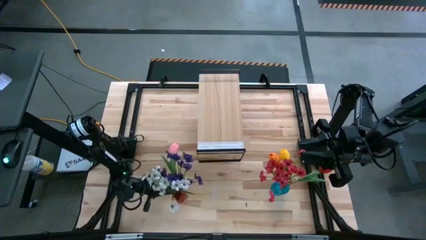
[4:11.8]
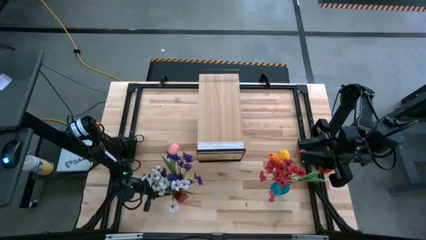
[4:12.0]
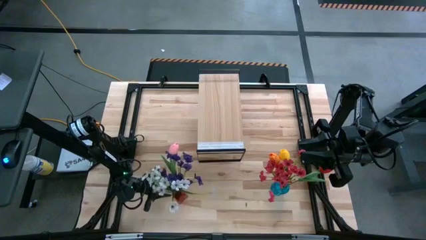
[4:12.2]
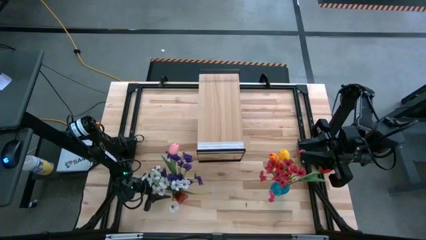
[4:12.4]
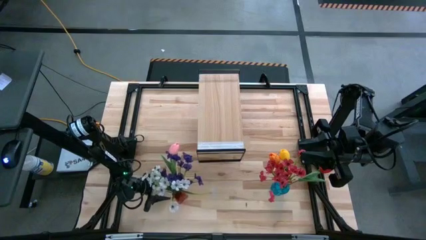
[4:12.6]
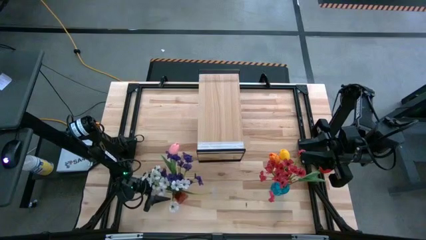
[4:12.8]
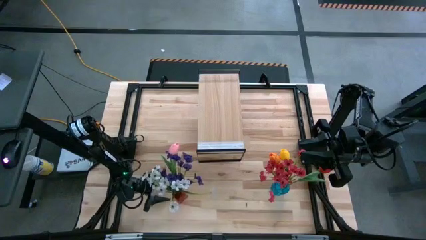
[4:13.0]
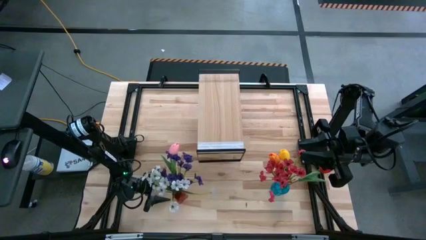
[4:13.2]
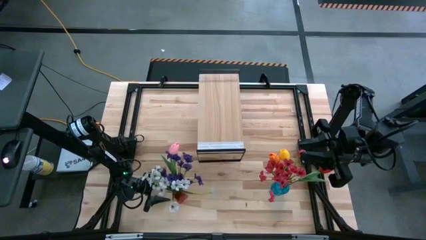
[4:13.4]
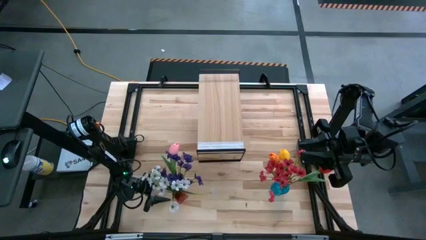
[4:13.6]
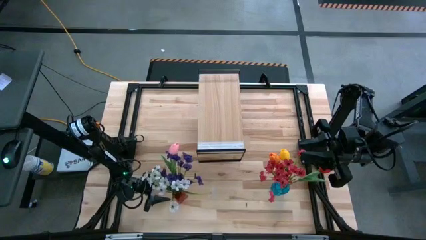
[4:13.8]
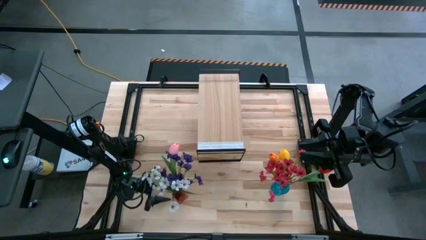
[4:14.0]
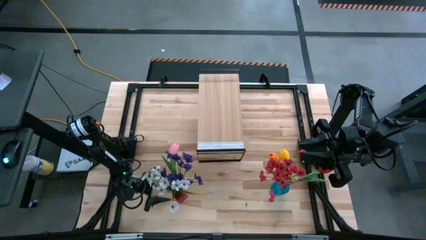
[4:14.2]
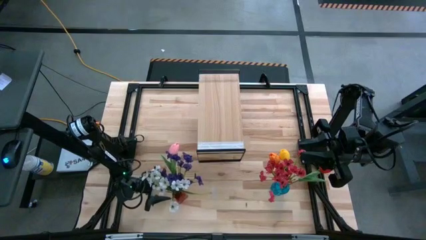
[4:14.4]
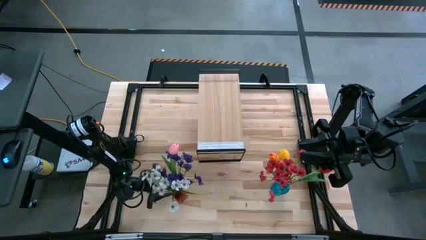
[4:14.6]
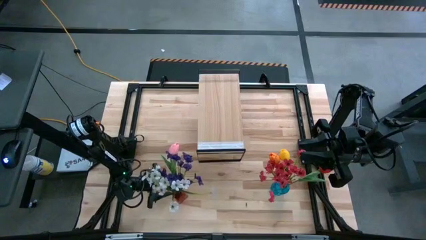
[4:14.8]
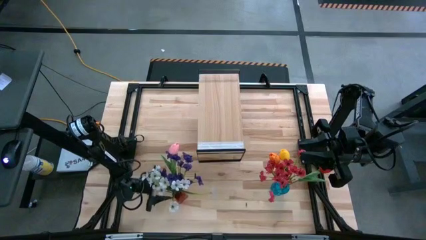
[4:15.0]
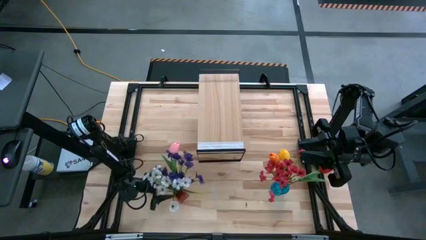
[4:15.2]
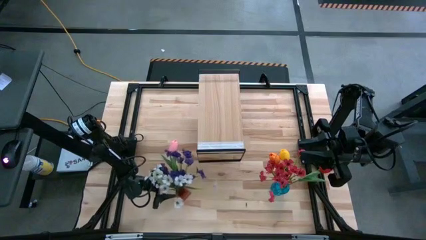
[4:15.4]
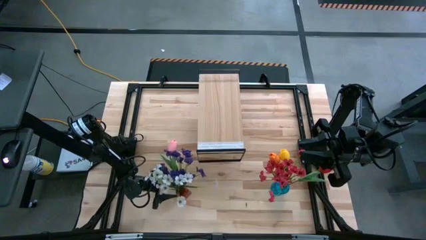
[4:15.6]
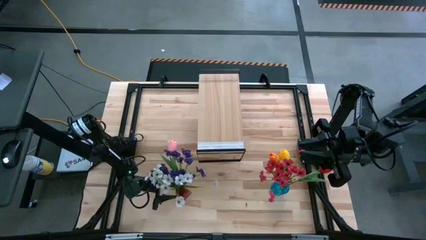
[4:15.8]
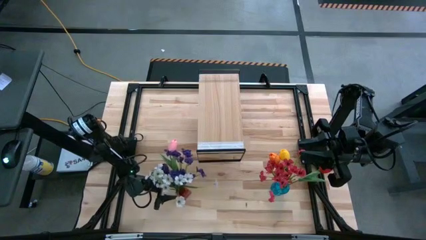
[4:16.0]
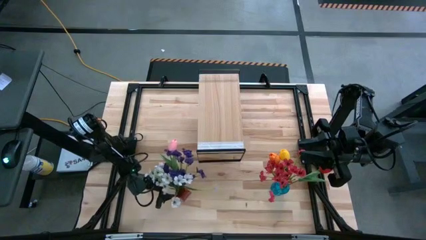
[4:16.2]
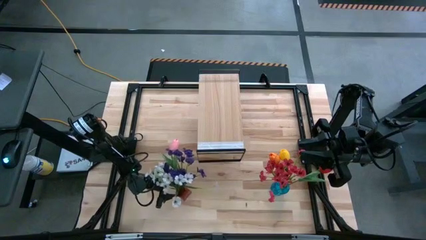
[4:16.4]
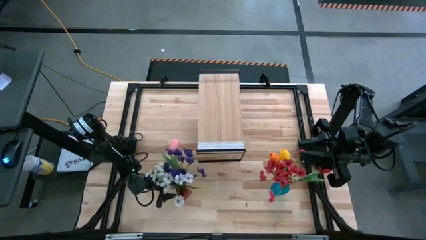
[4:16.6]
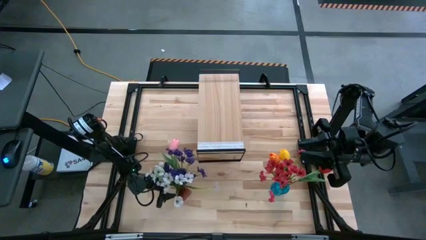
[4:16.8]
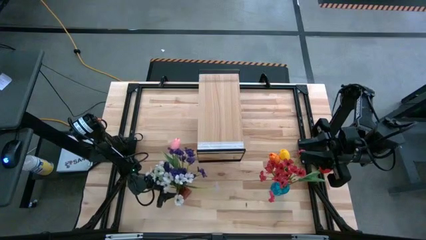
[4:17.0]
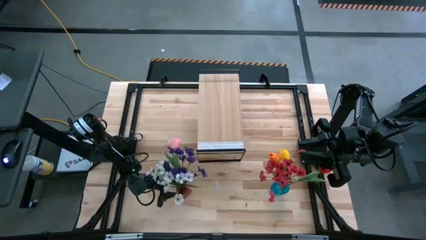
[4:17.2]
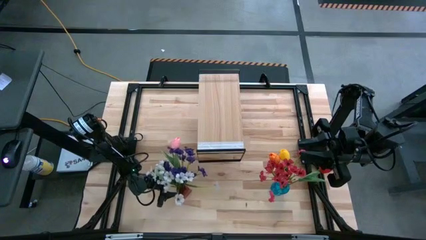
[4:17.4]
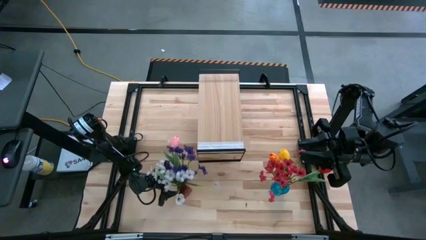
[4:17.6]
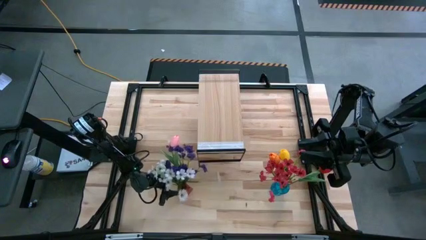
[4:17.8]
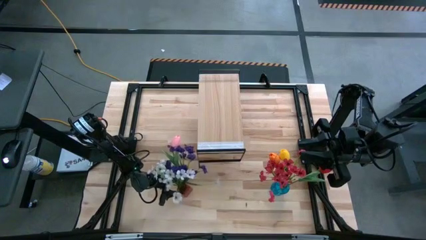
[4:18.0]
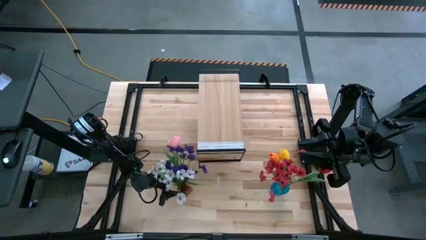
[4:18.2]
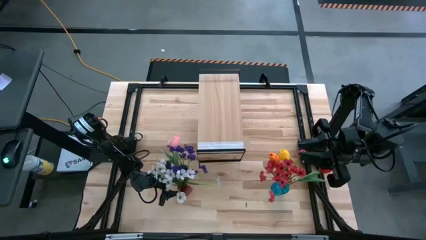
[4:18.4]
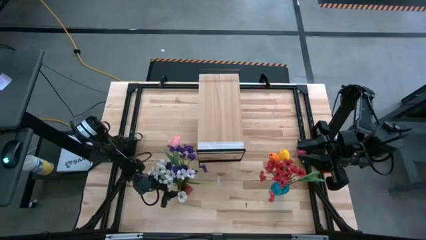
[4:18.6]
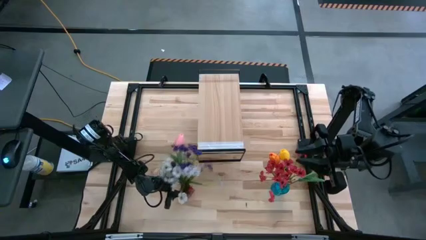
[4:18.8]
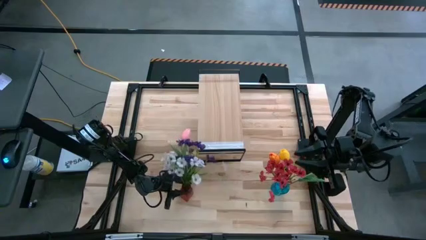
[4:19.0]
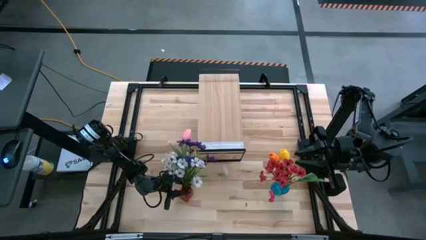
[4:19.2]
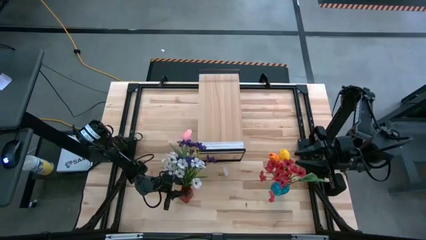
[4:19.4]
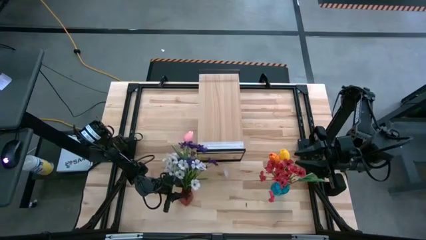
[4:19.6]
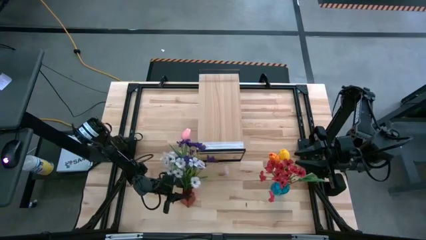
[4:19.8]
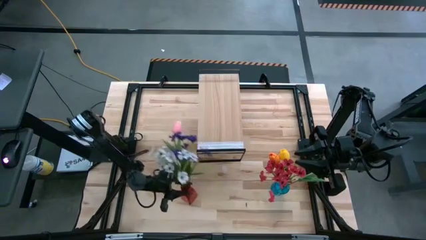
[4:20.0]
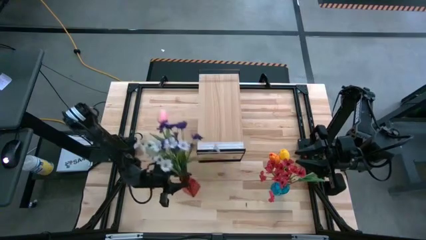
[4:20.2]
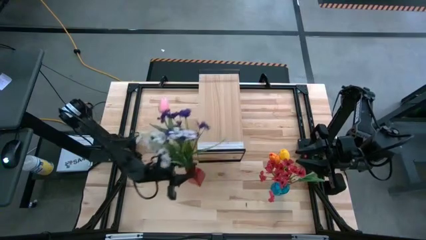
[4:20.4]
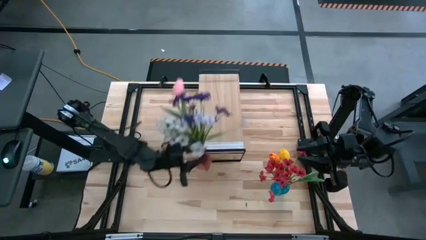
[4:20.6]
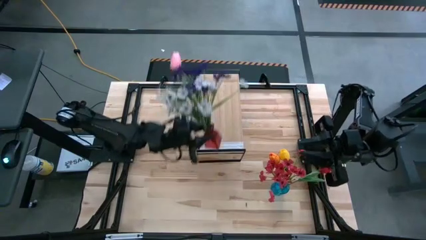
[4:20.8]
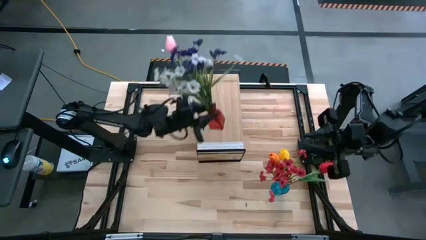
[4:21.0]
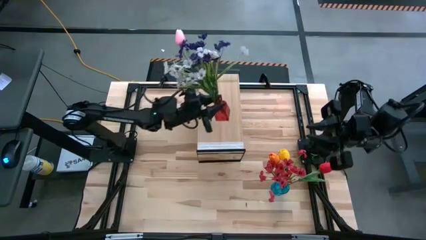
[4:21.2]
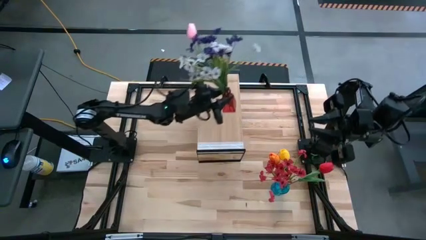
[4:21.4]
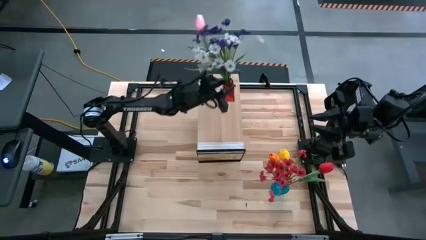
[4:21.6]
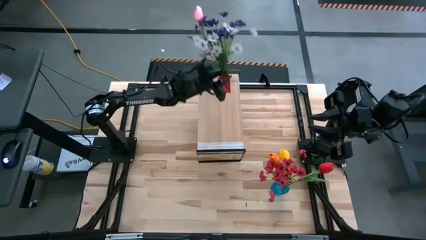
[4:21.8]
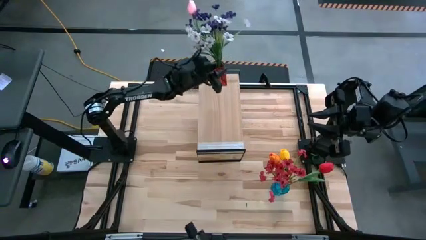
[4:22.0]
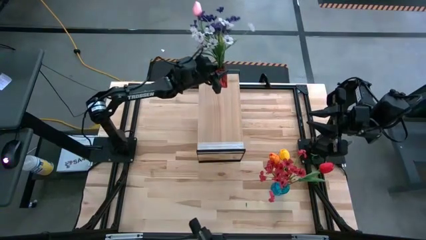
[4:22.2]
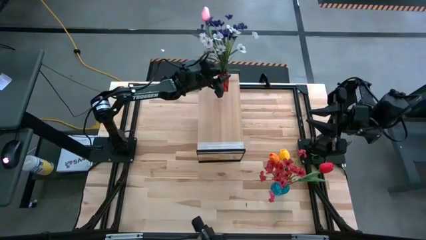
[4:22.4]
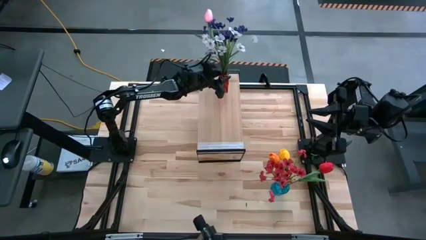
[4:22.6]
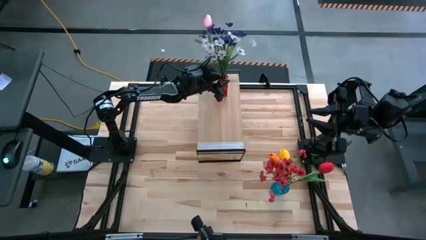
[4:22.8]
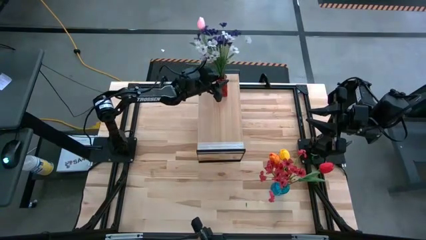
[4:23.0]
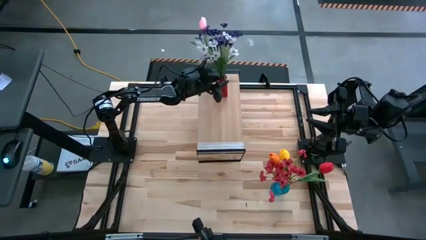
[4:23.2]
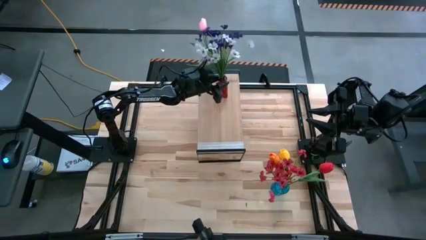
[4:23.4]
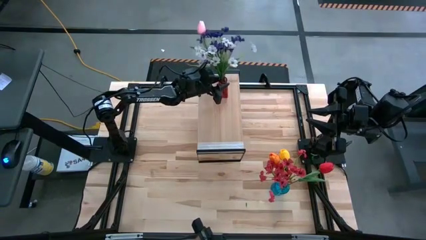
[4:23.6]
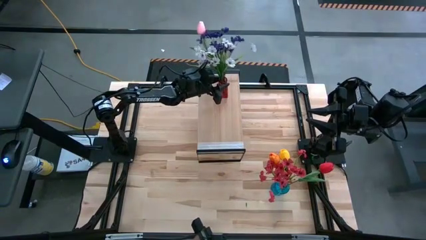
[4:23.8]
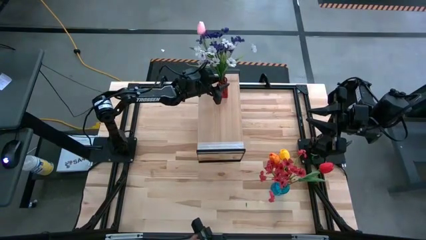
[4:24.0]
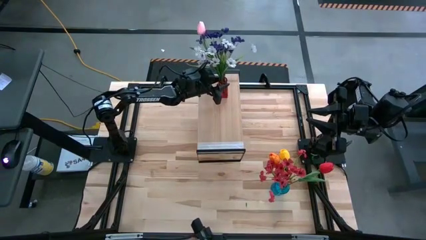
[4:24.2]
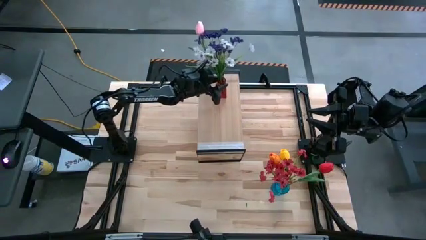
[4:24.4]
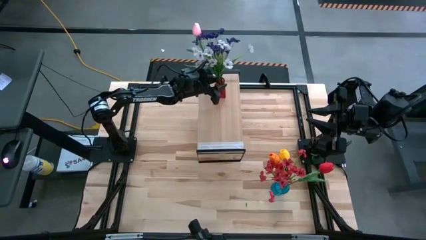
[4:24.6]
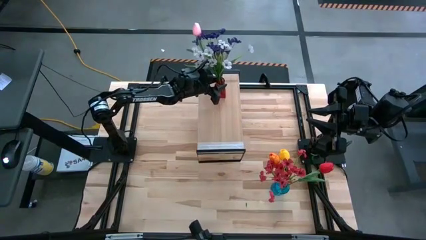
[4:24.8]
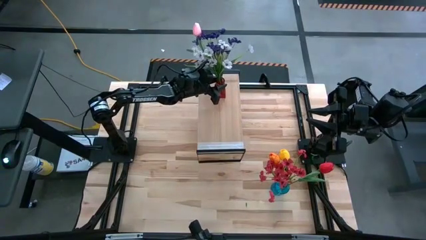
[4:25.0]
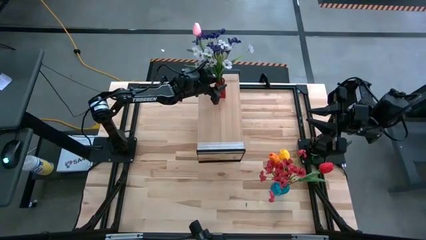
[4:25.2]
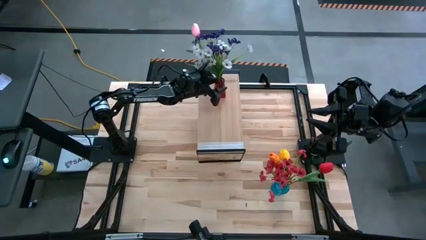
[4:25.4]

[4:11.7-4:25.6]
Task: Pick and place flowers into a vace then onto a shelf
Put the red vase with flowers on the shelf
